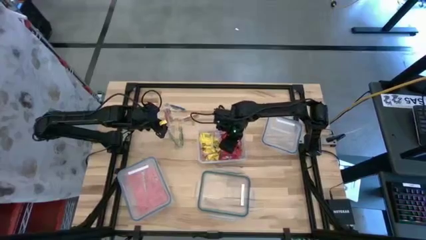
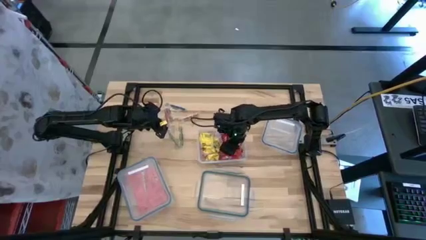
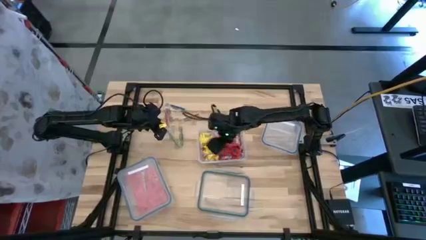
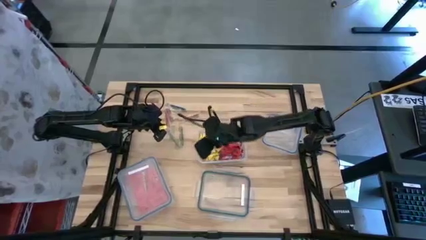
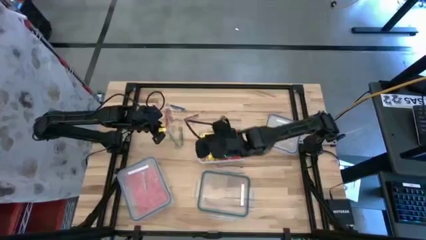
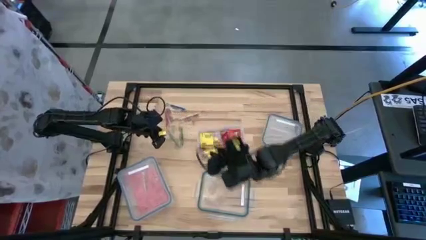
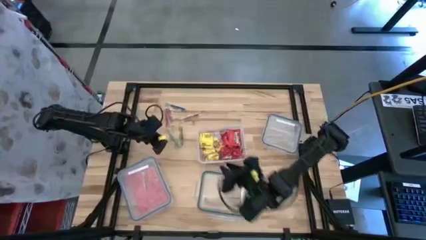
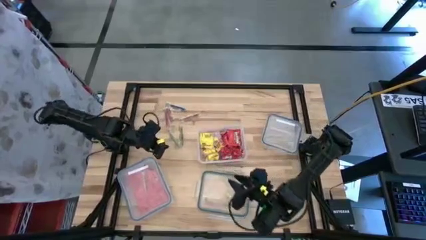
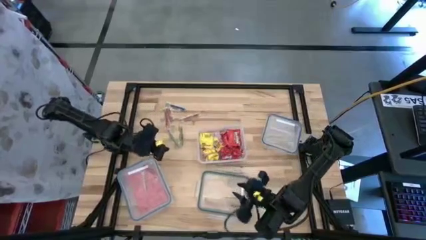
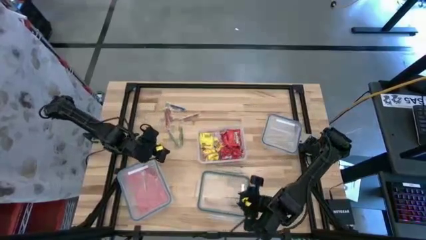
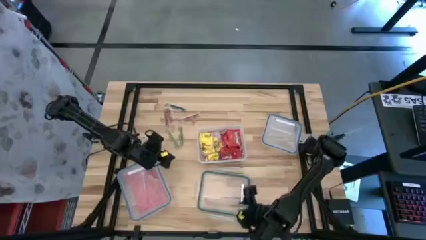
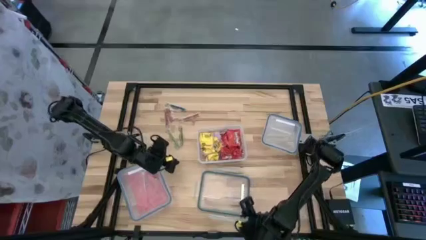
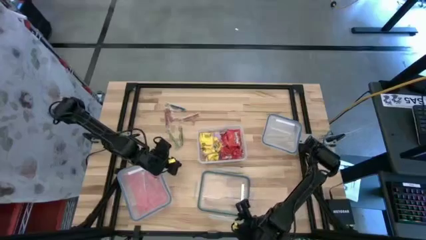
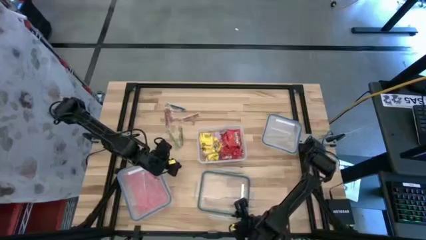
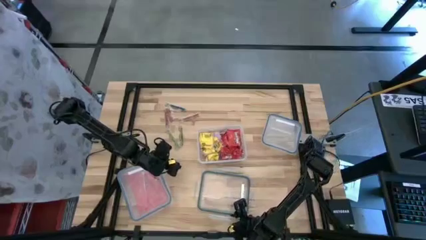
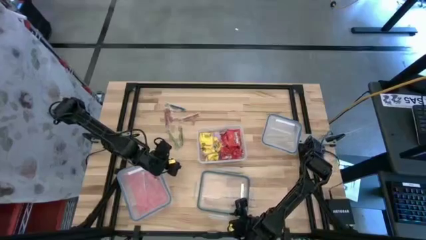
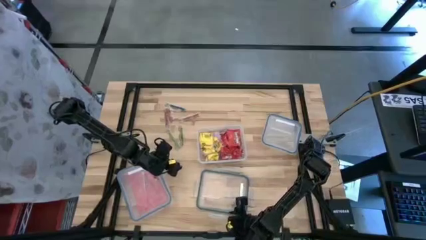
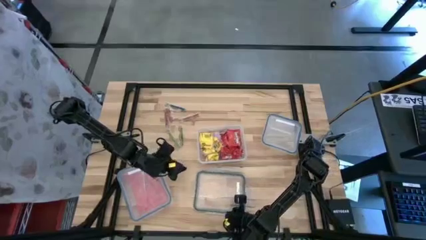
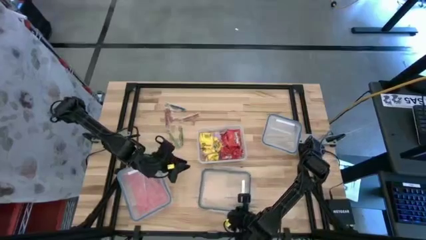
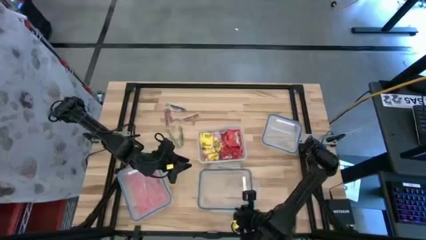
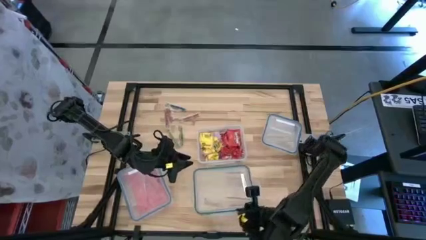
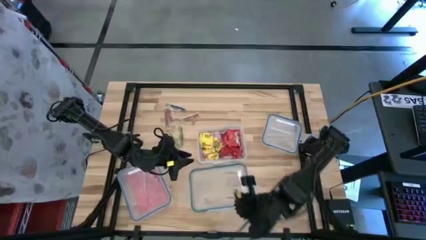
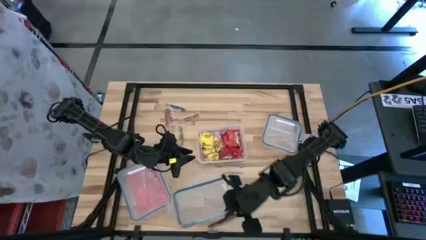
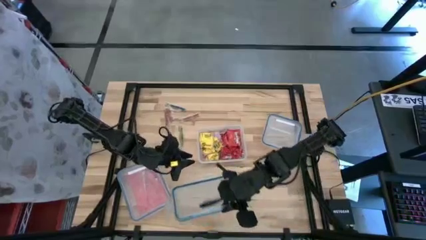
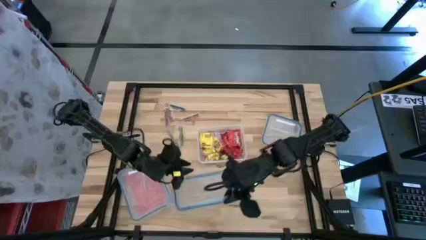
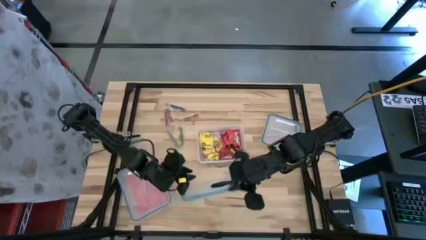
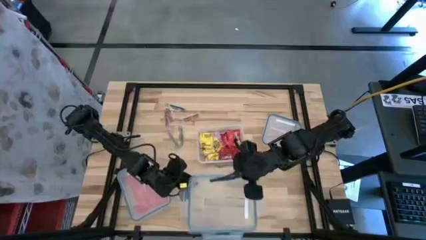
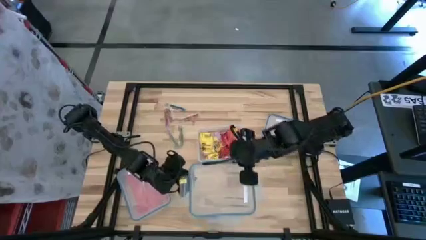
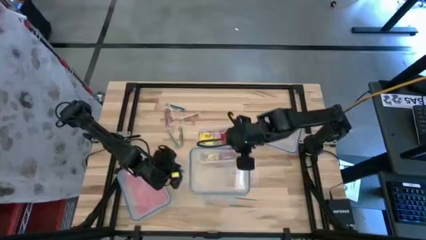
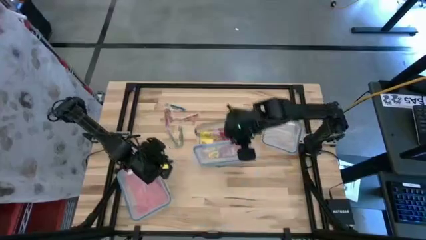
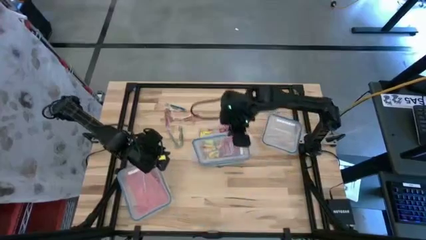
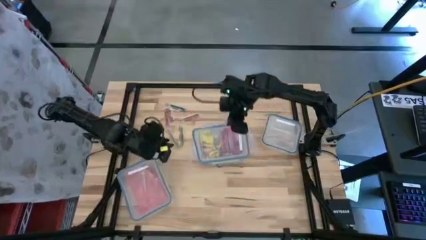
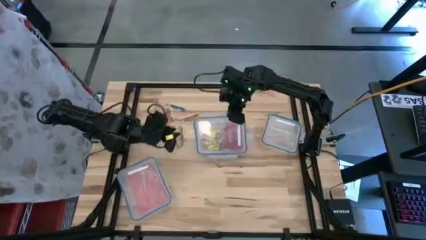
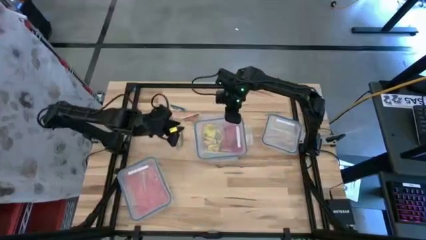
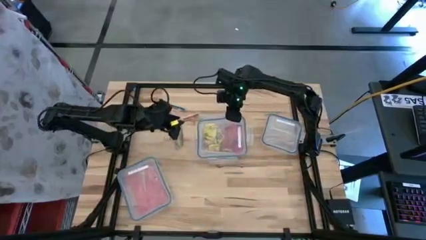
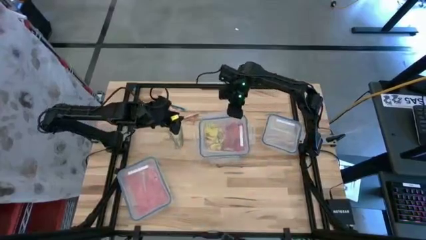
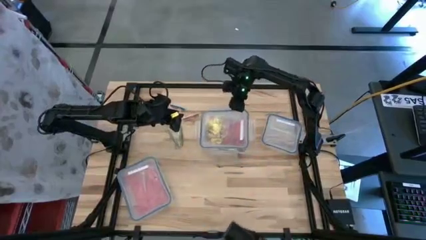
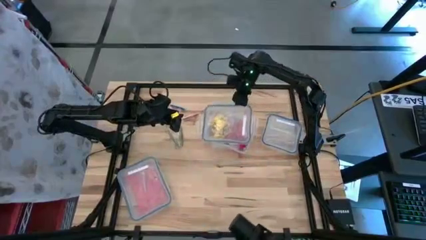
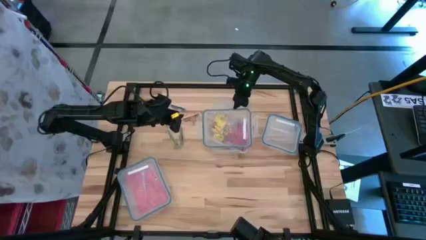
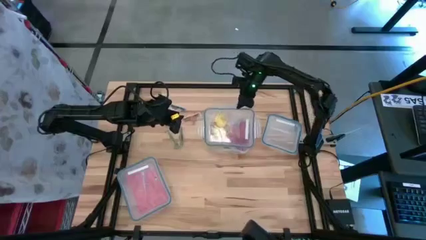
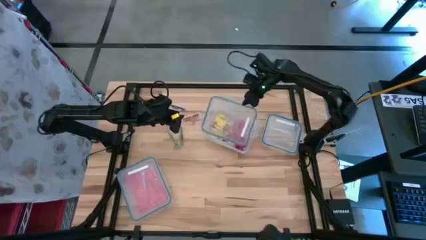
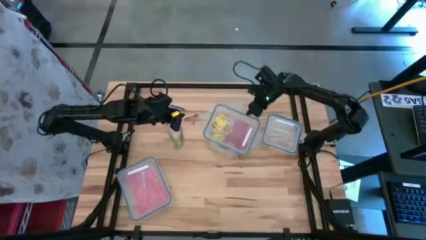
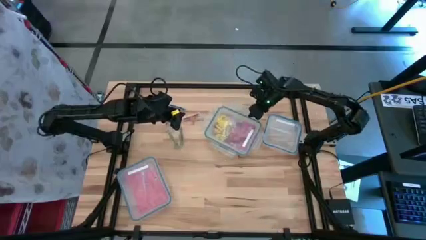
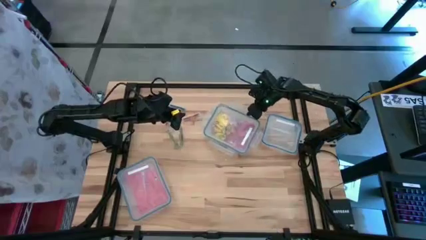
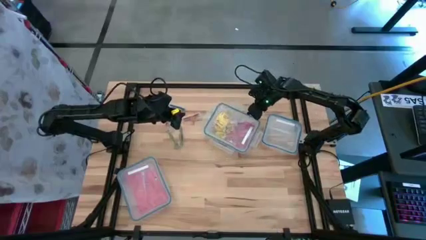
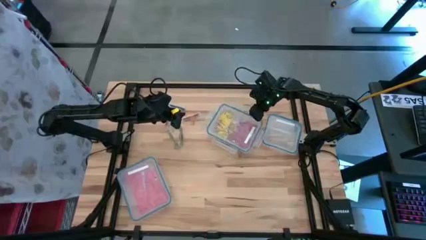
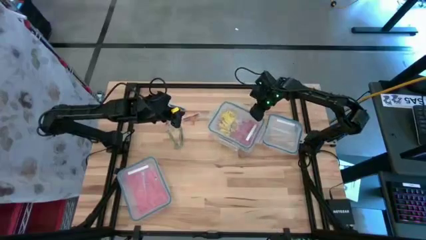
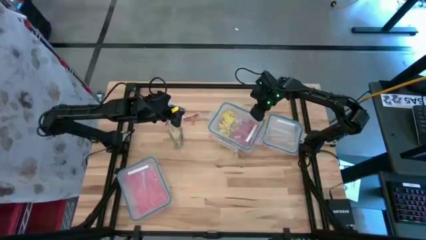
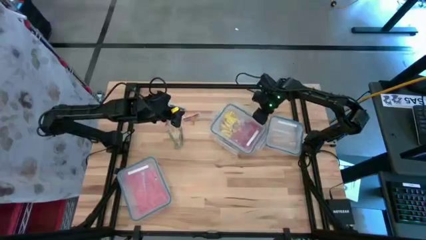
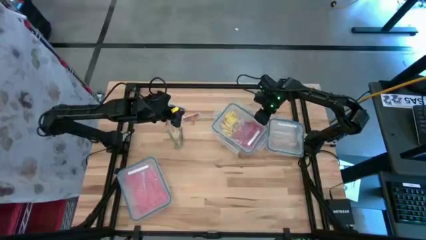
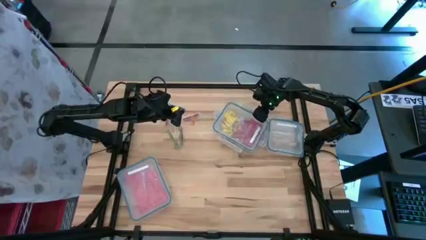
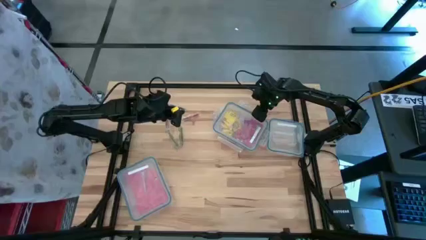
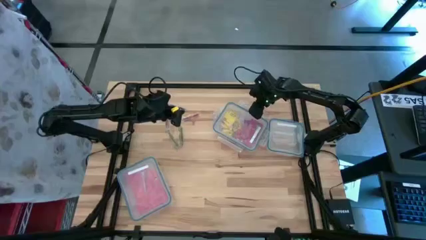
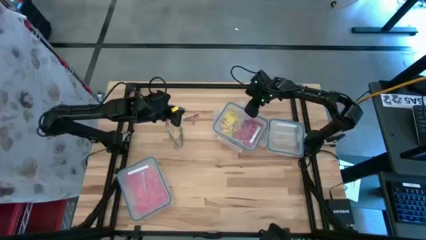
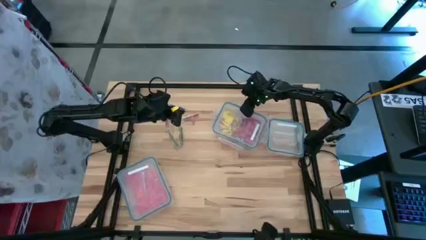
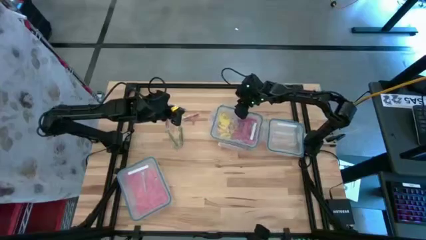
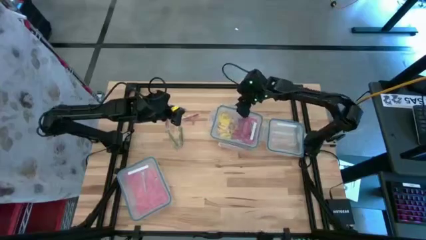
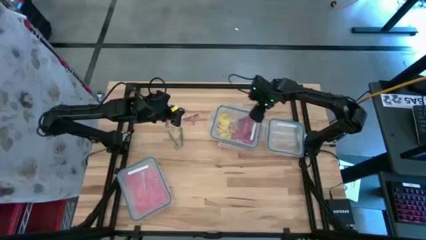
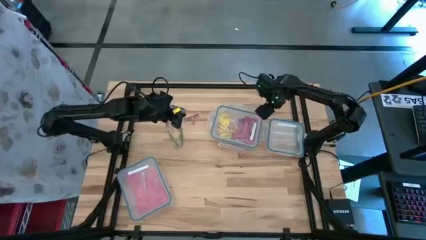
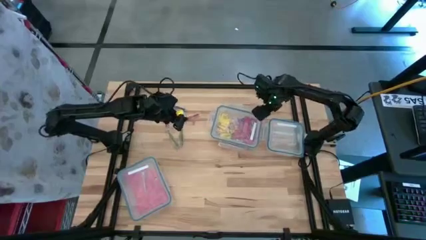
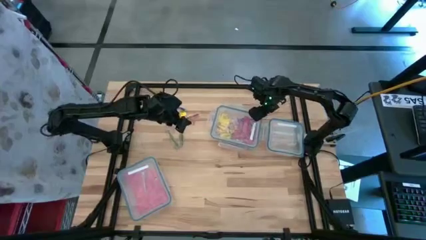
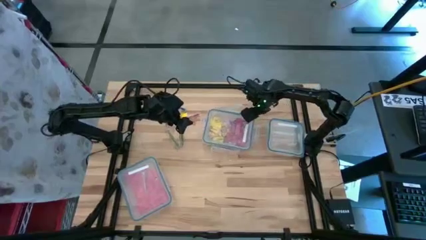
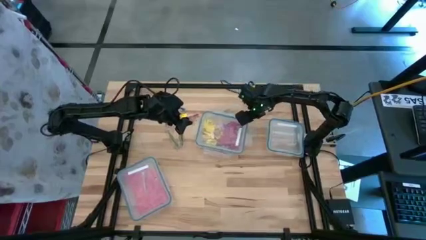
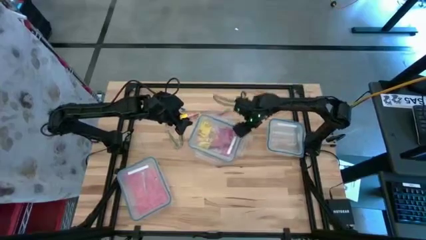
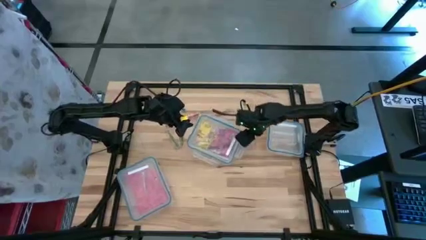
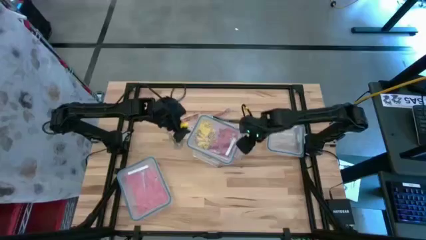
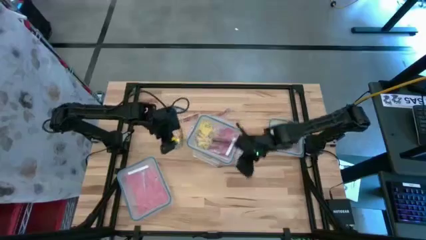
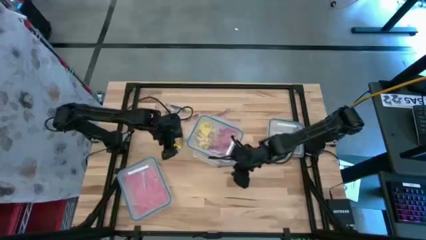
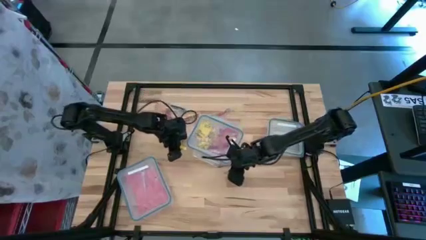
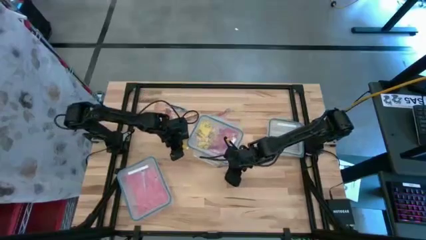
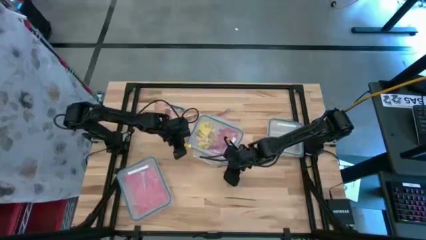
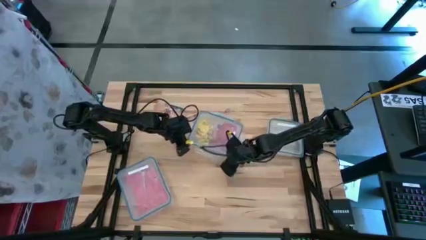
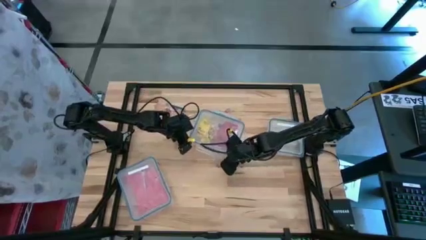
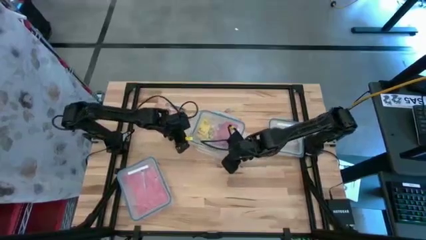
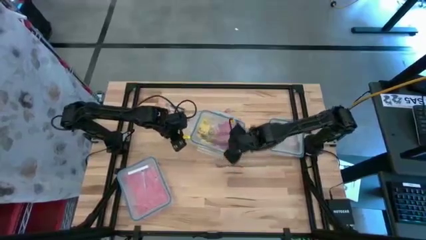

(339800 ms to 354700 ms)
Task: Sort candy
Close the rectangular transparent bin
